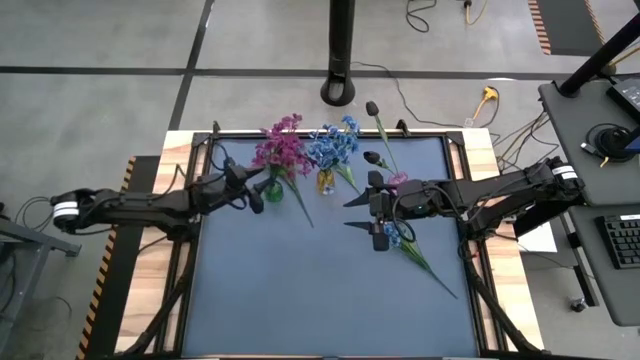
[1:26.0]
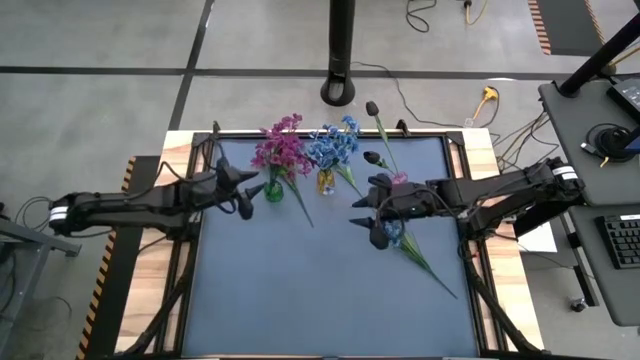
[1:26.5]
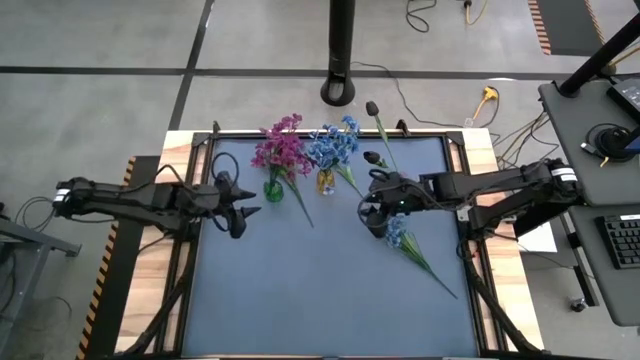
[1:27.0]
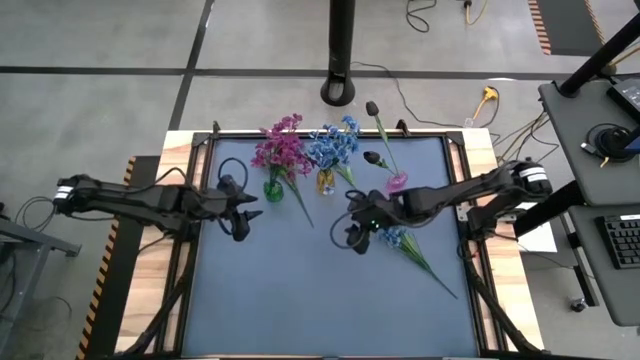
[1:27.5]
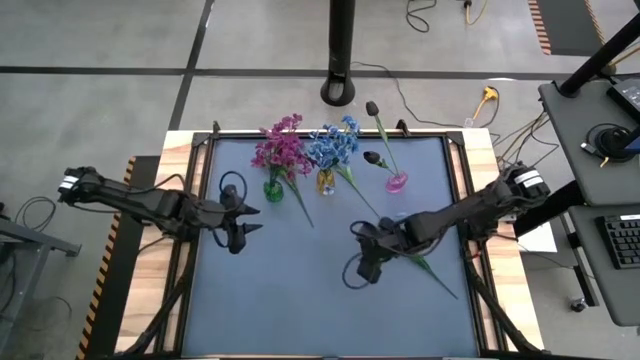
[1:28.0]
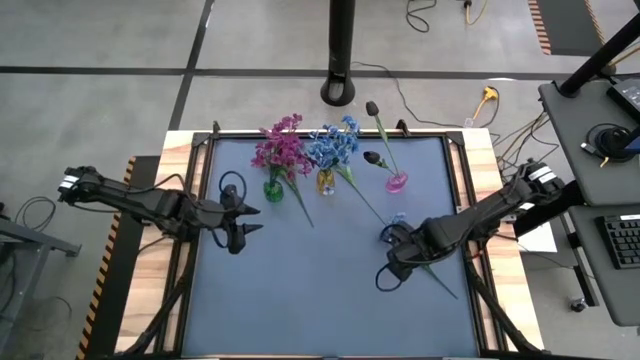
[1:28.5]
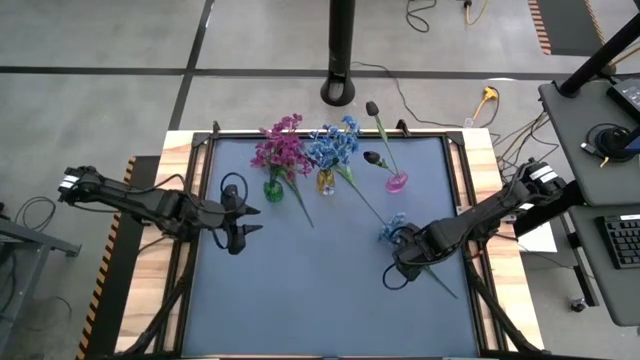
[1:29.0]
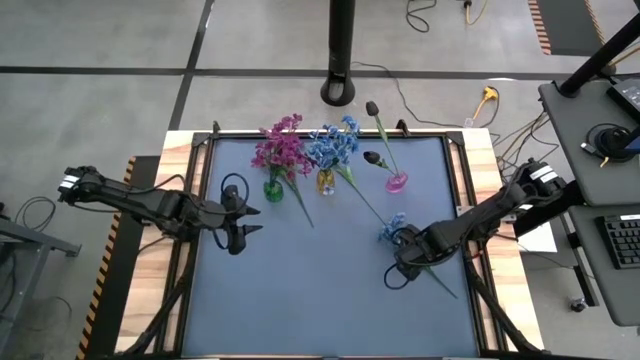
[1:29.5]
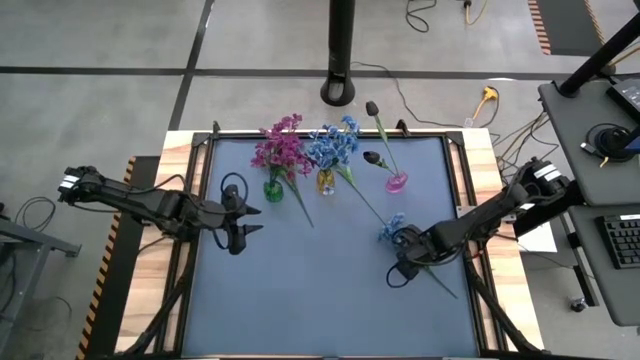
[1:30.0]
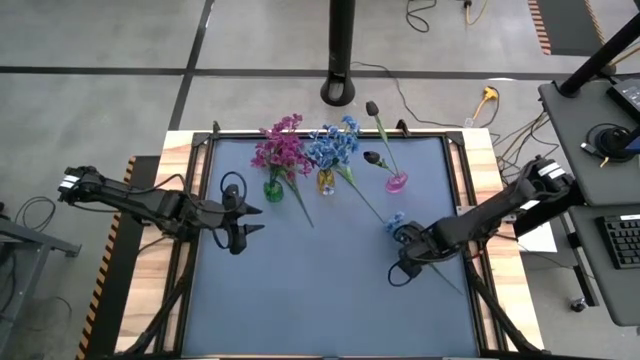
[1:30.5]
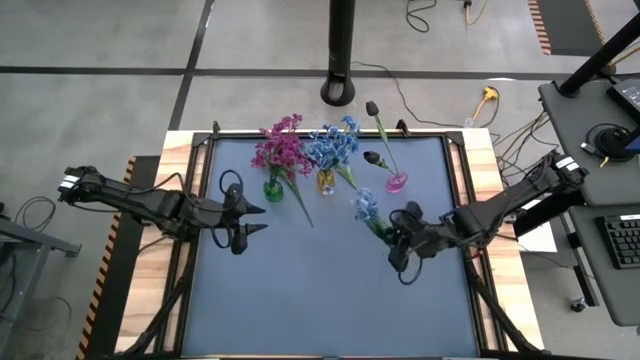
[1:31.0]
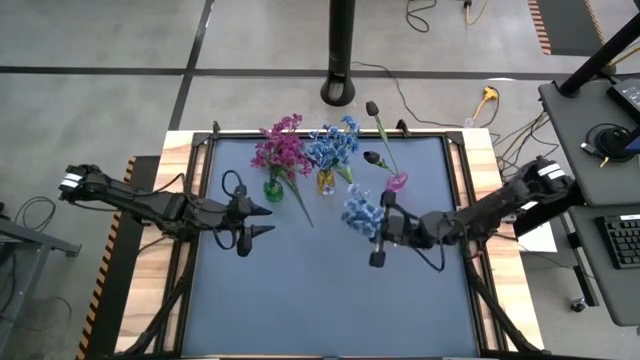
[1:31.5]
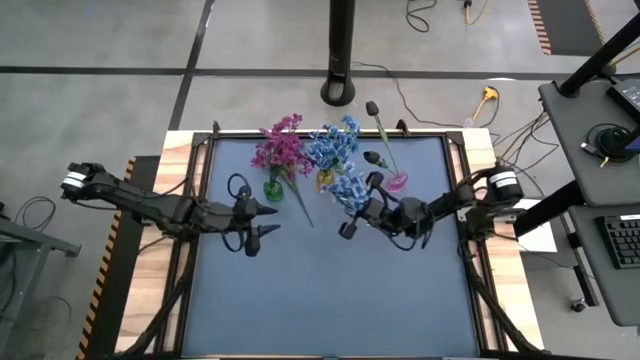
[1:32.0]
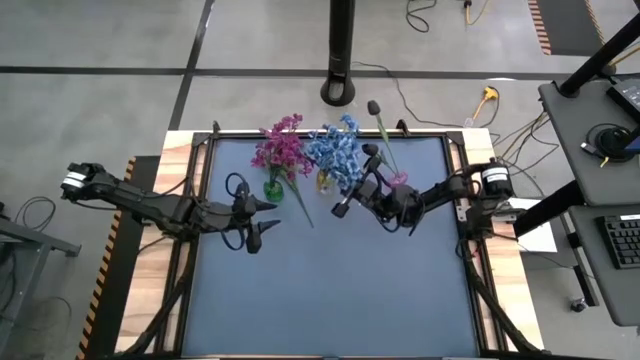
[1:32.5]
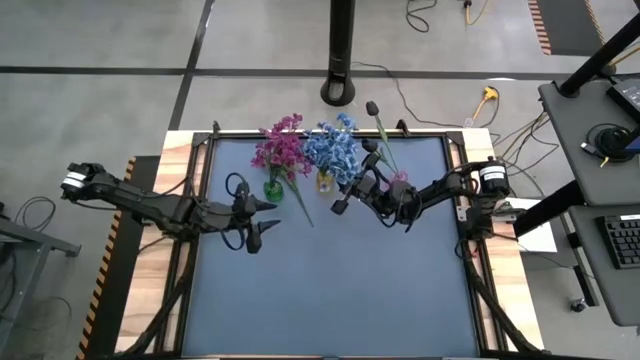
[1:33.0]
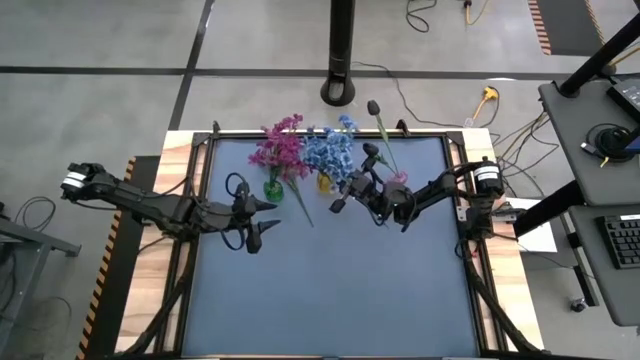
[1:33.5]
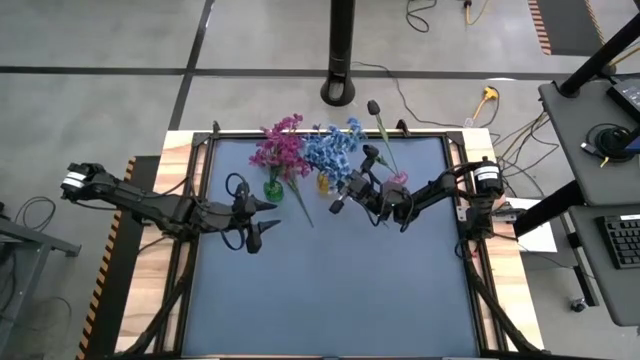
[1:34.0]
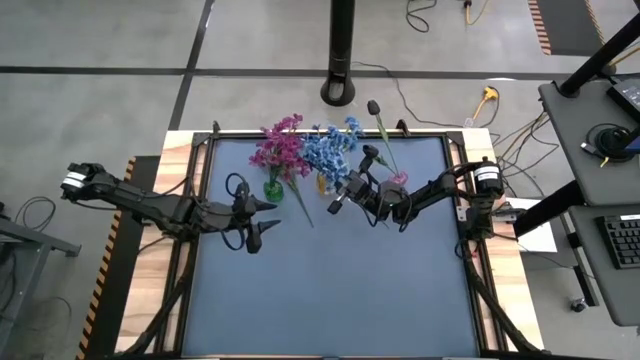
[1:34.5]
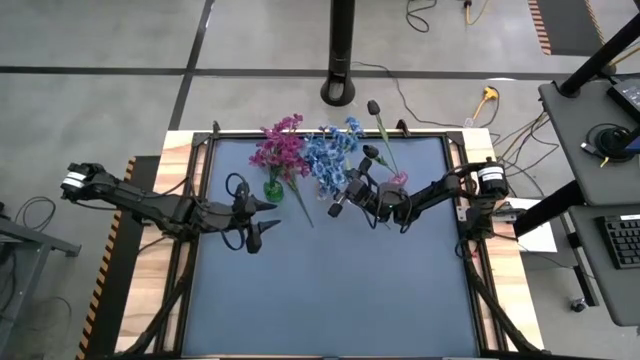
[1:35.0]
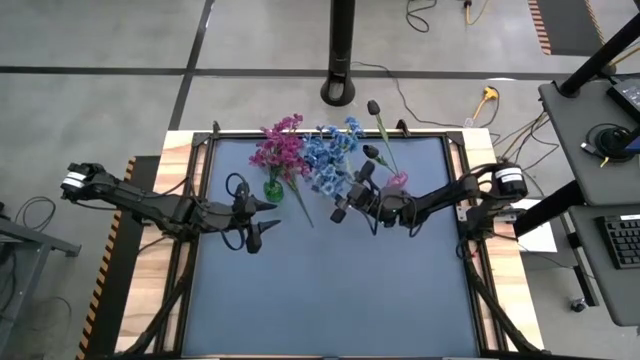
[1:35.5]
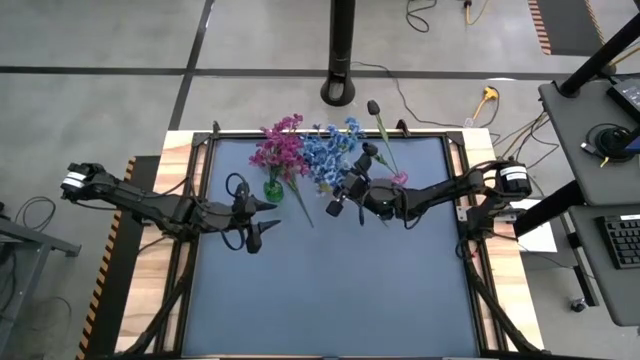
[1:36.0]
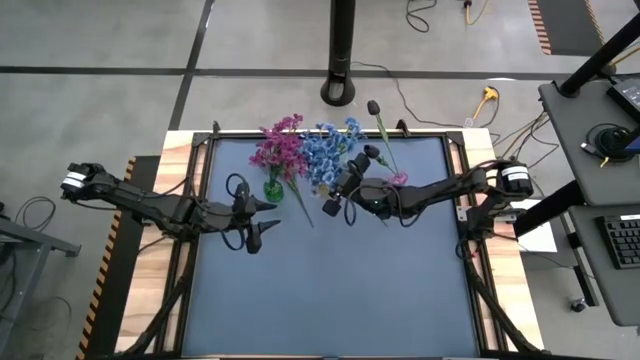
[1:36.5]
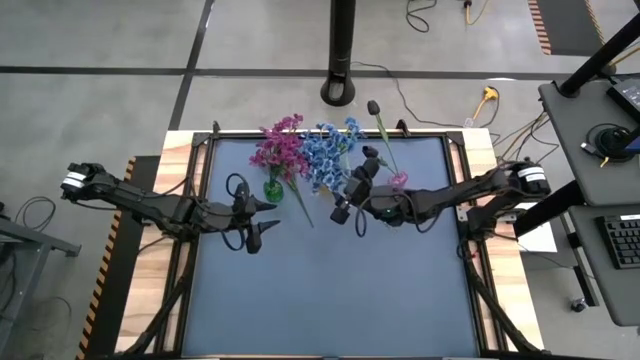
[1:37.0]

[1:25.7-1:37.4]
Task: Sort flowers into vase by color
Put the blue flowers into the yellow flower vase

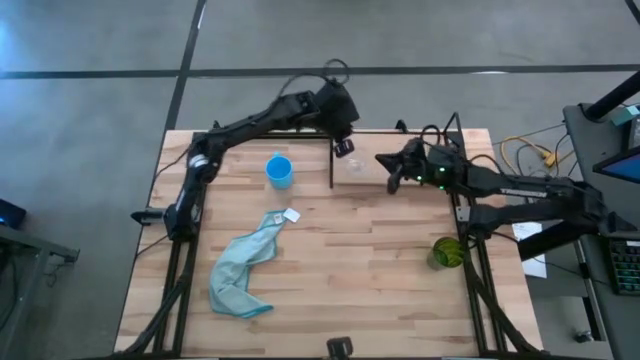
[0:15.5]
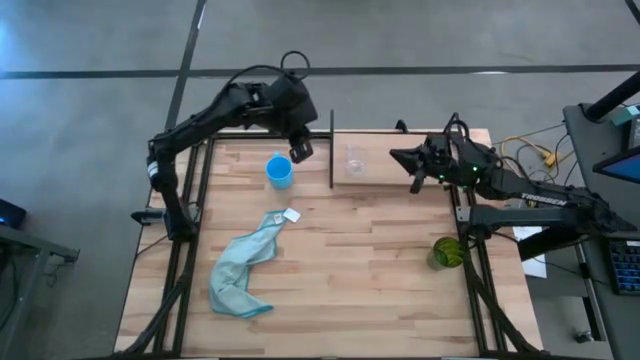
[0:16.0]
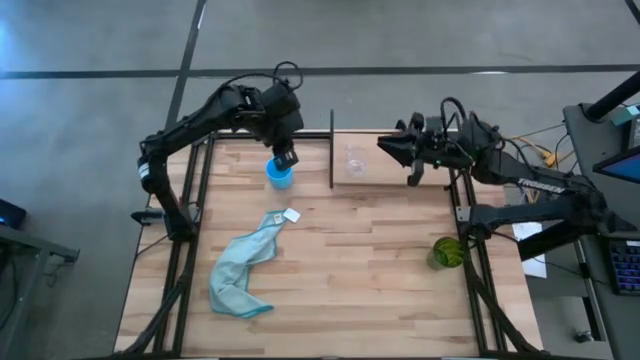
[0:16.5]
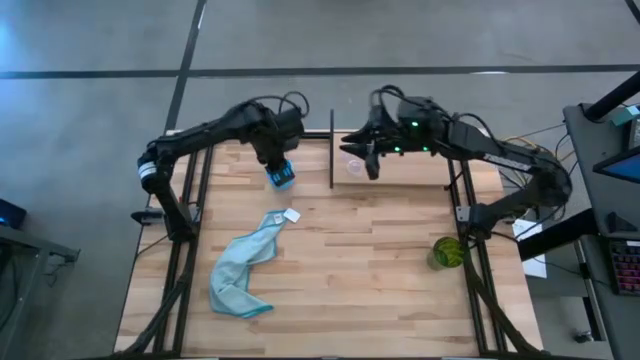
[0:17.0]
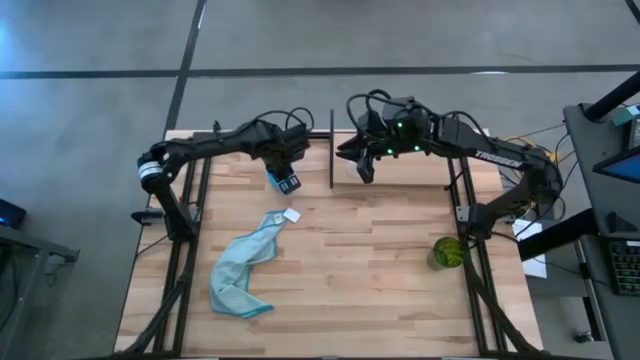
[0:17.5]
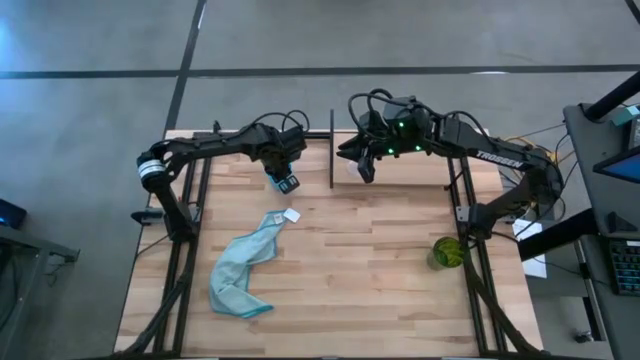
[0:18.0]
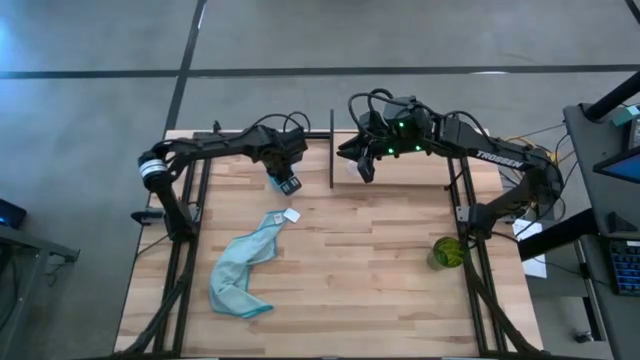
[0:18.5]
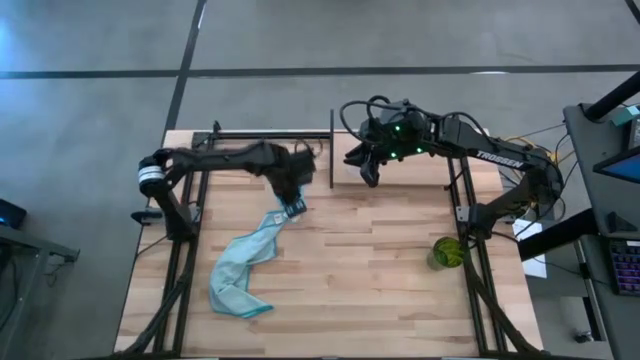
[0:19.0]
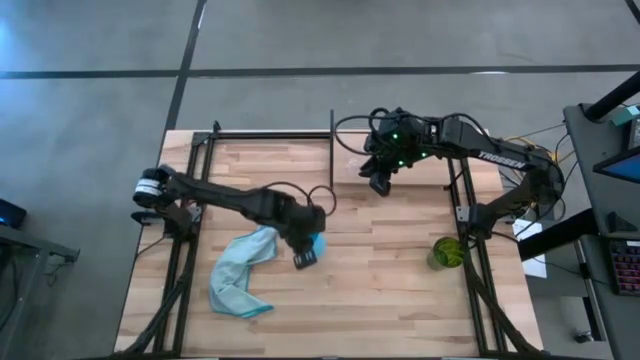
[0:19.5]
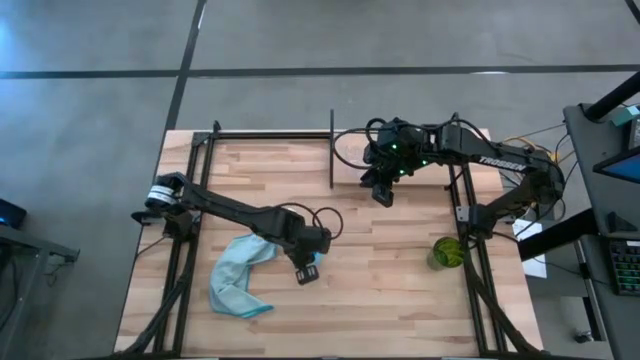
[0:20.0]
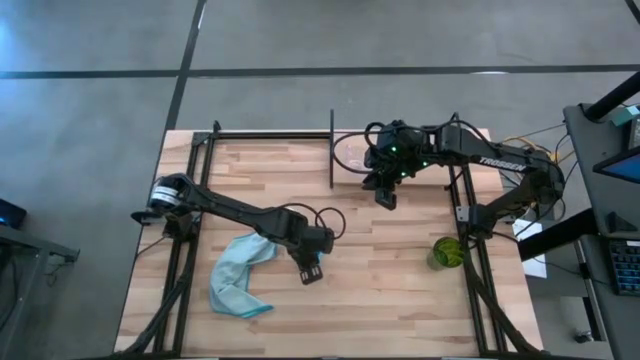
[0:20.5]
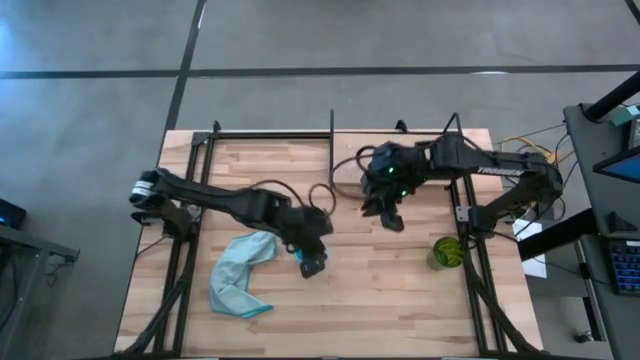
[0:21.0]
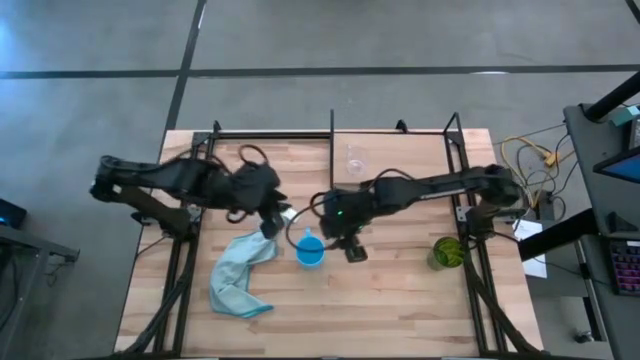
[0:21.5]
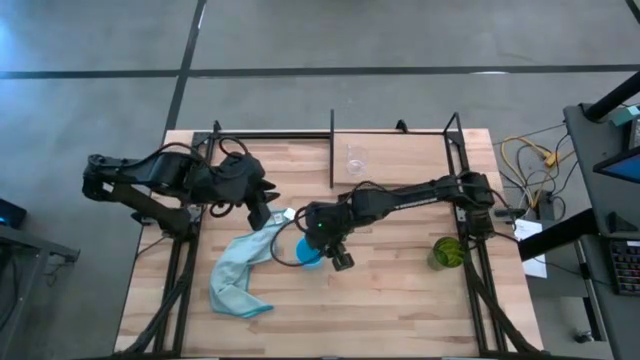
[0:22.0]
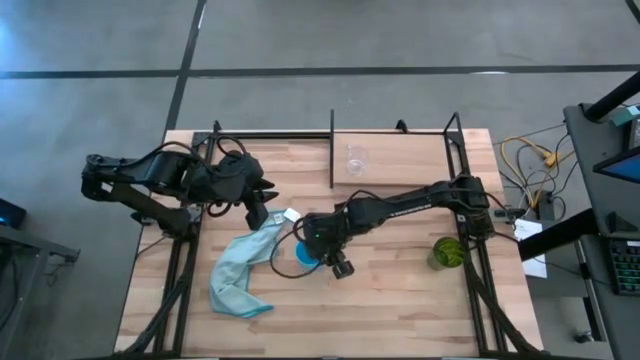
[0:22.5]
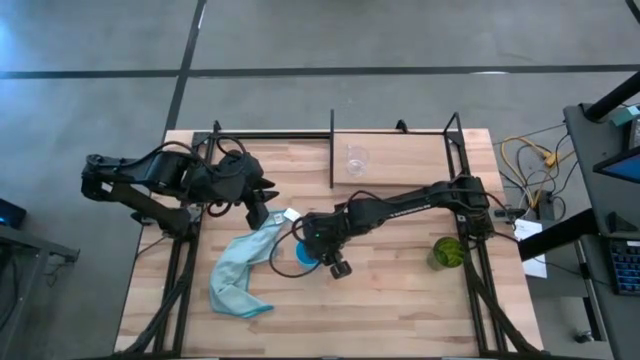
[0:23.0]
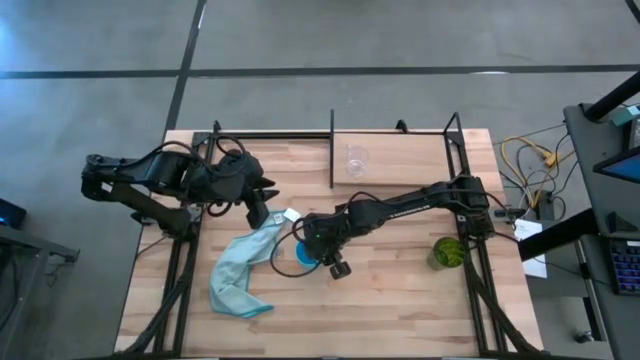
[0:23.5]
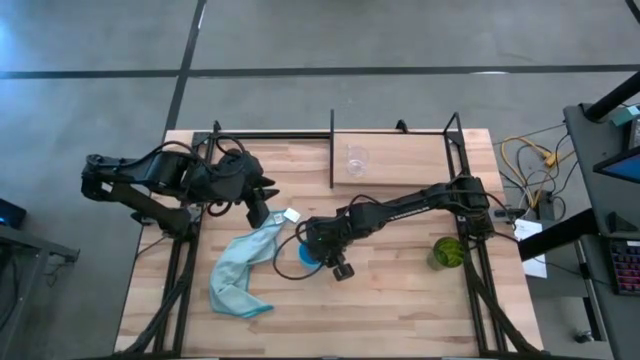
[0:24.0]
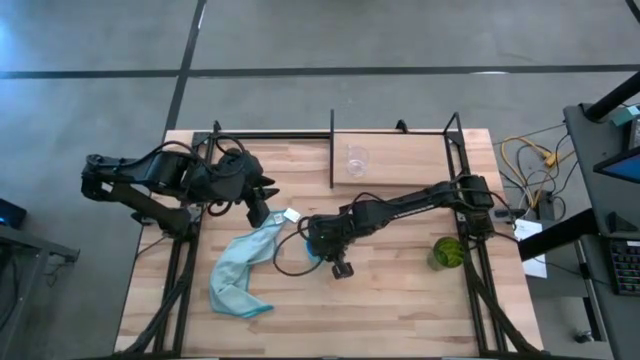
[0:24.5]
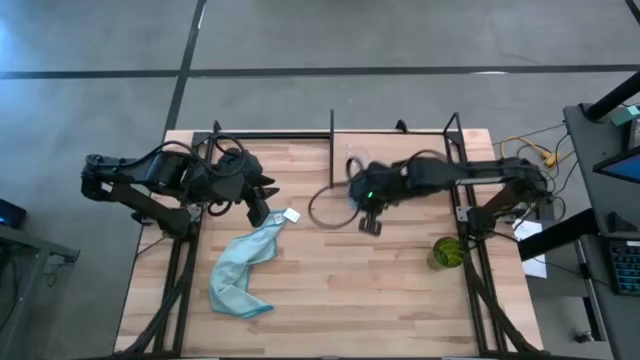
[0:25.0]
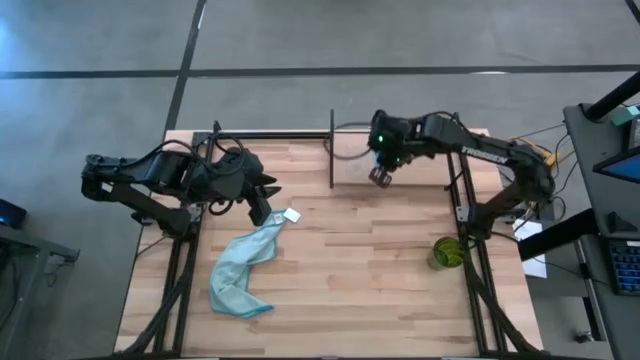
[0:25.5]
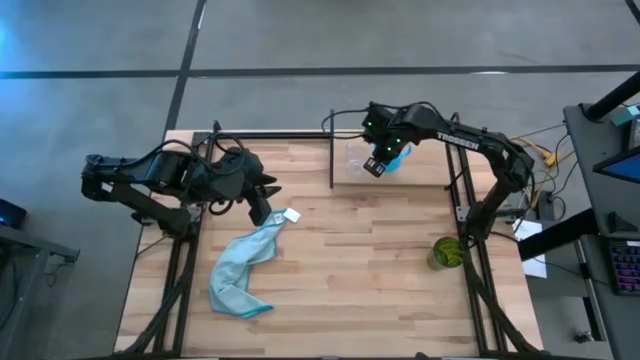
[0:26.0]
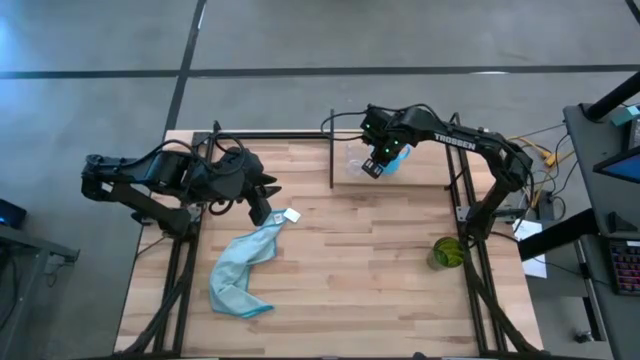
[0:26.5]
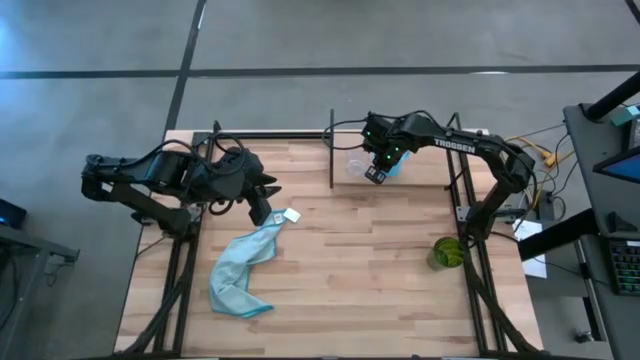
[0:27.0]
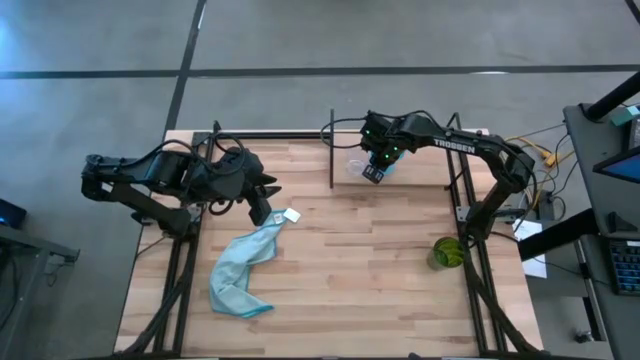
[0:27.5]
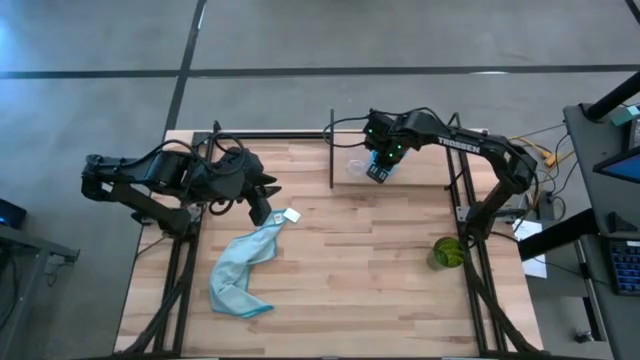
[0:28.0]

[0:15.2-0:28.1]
Task: Stack small to large cups/mugs on shelf
Put the blue mug on the shelf
